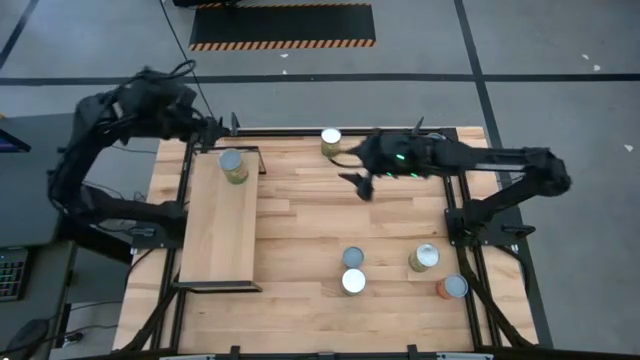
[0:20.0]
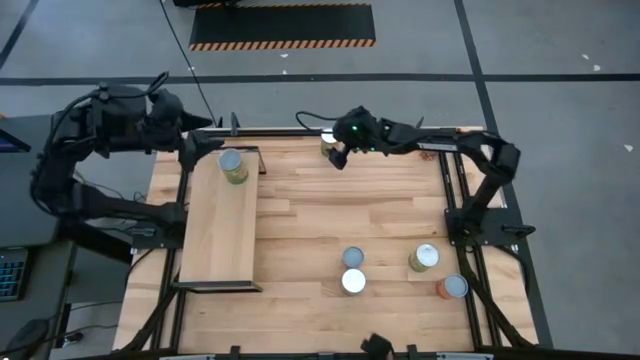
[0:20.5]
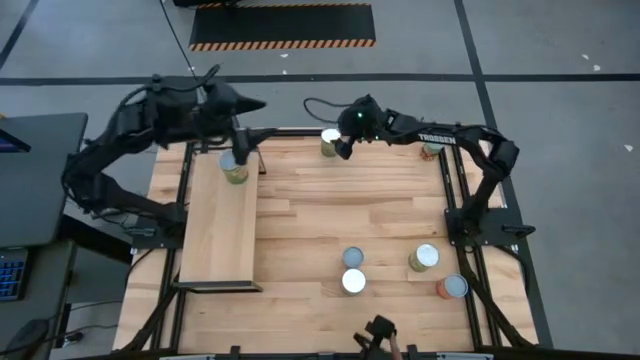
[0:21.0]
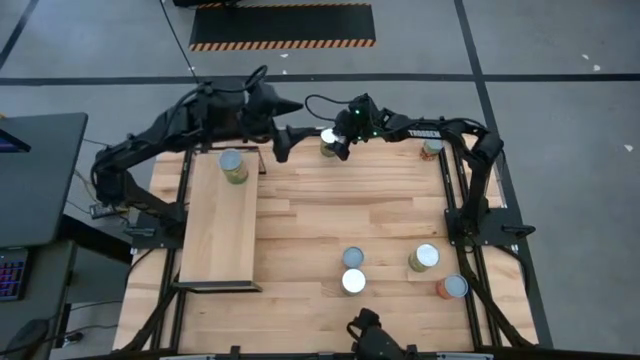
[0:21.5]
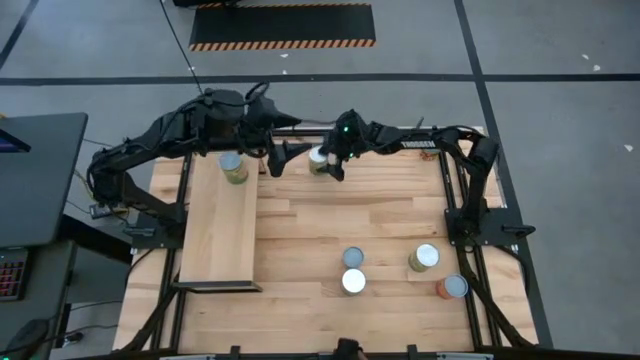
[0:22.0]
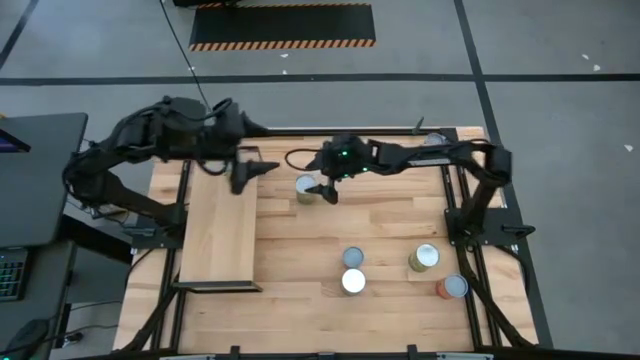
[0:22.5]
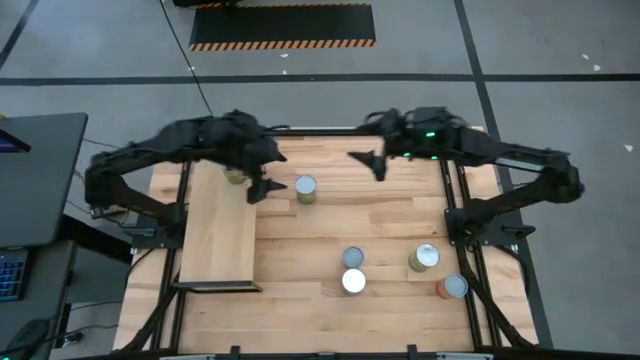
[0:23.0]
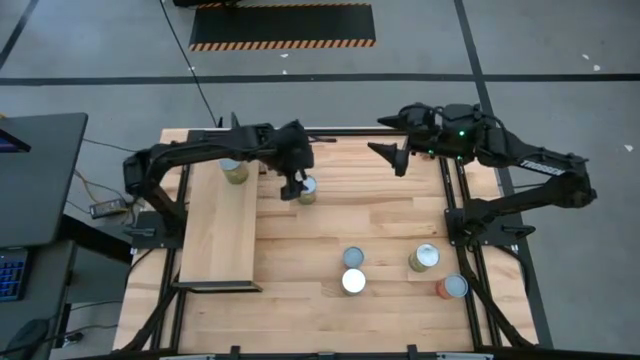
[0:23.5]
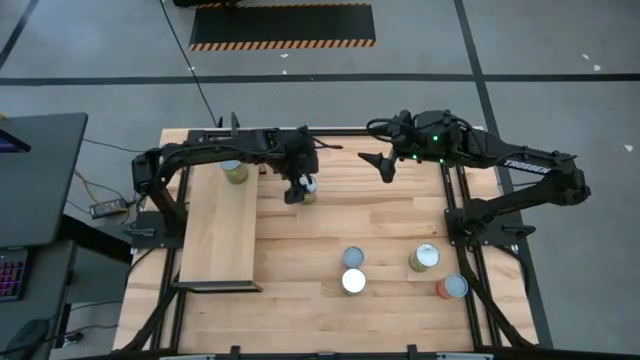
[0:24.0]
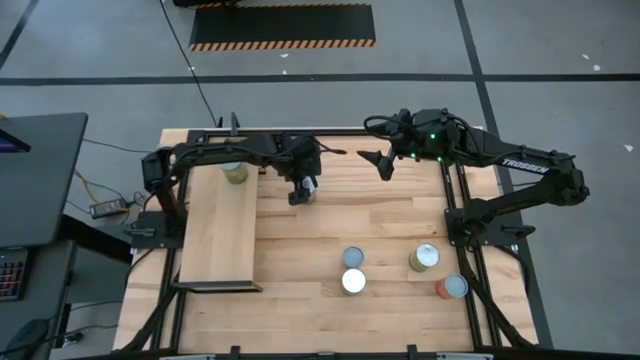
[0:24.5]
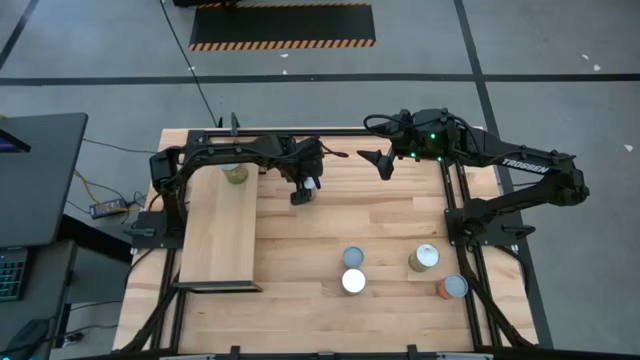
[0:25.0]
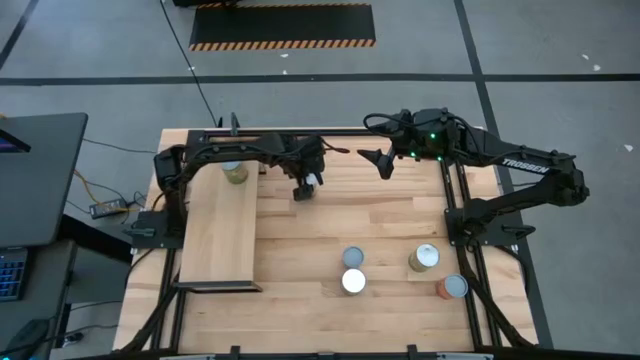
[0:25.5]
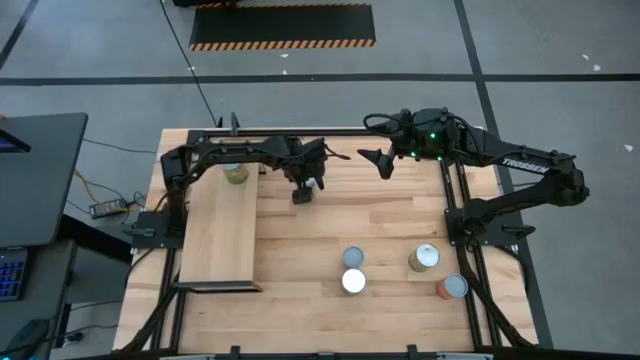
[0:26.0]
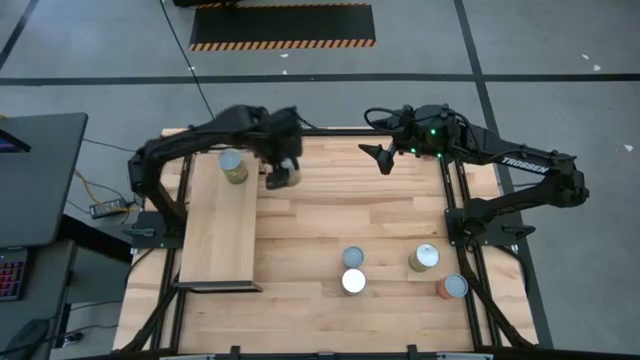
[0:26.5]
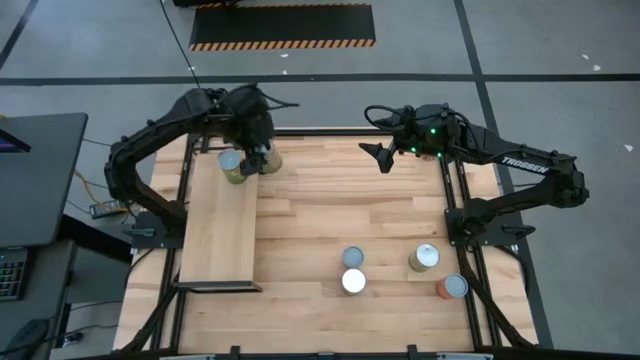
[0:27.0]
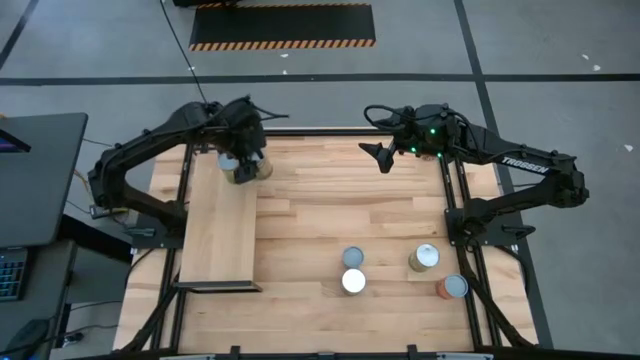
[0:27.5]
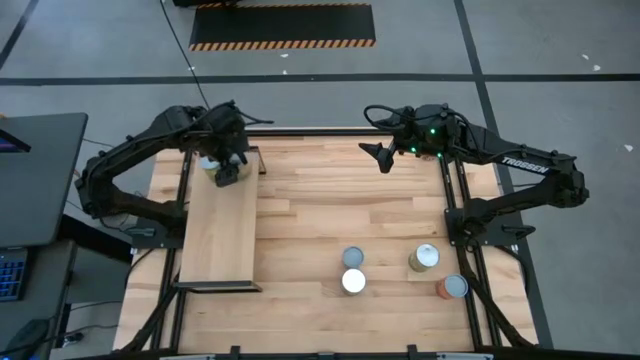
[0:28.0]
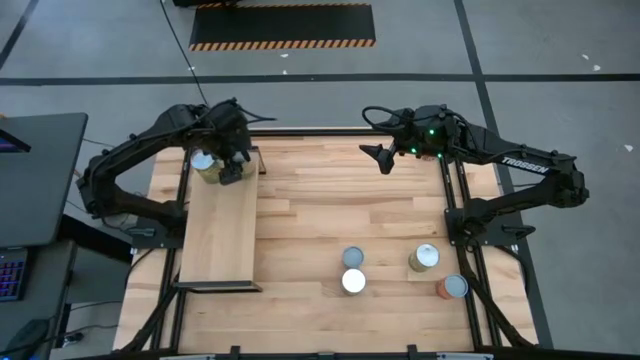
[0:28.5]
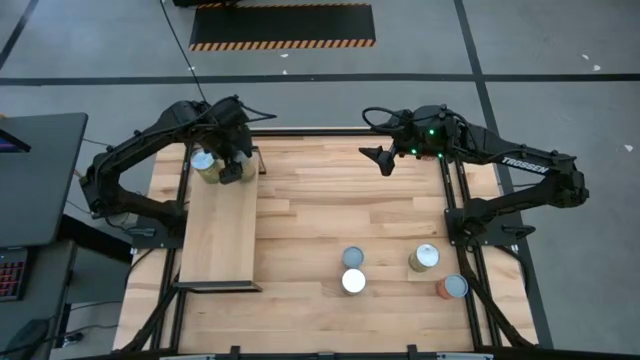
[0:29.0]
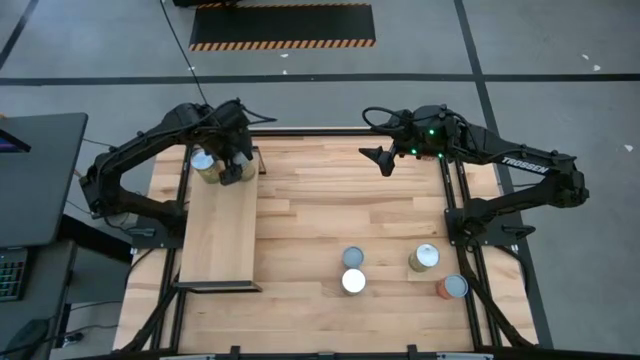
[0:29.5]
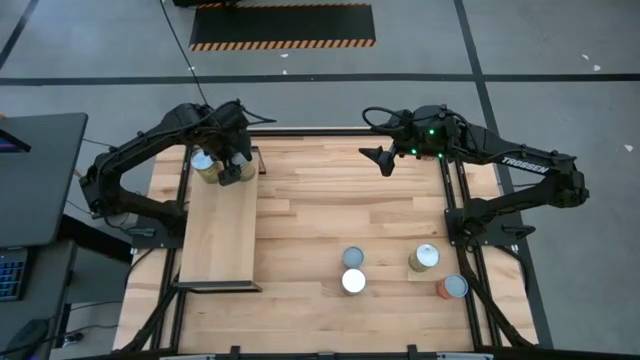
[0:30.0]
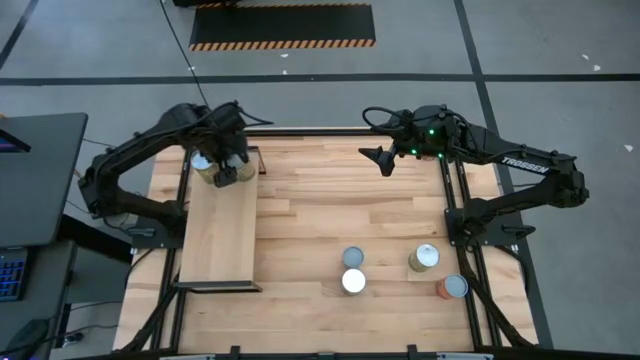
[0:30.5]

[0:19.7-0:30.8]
Task: Pick and place cans onto a shelf
Put the large canned oranges on the shelf aligned with the other large canned oranges

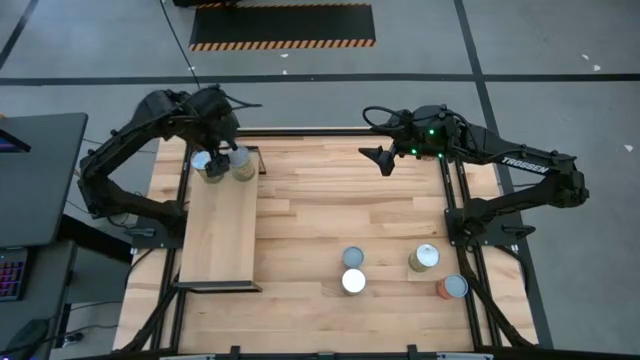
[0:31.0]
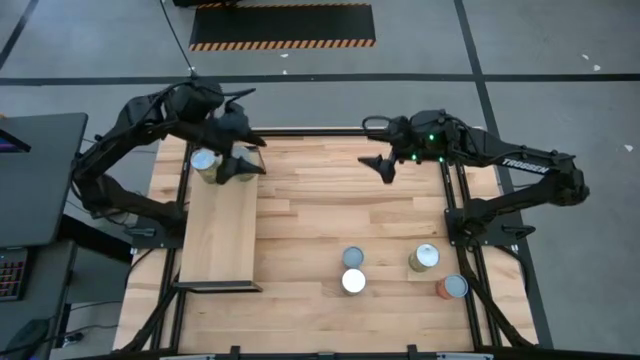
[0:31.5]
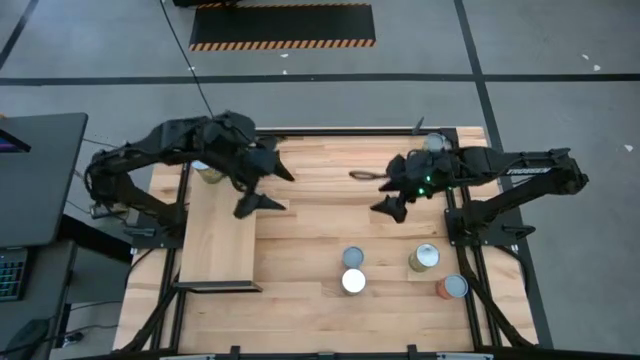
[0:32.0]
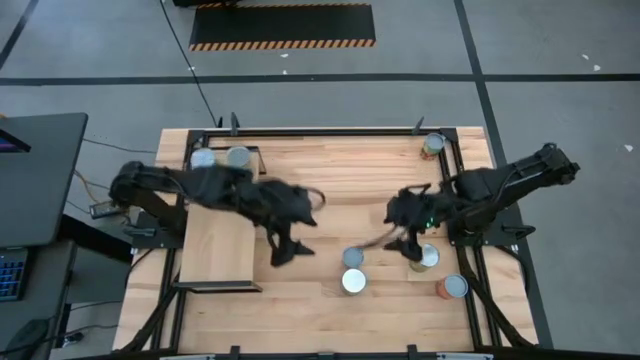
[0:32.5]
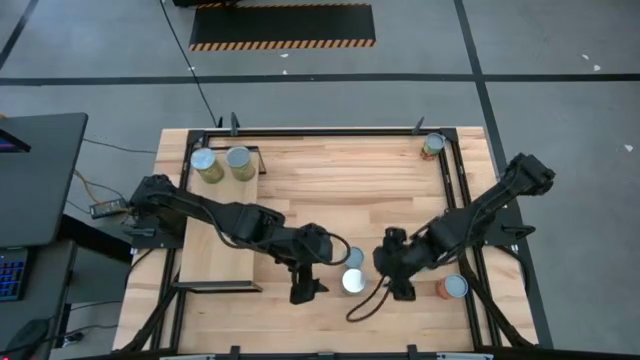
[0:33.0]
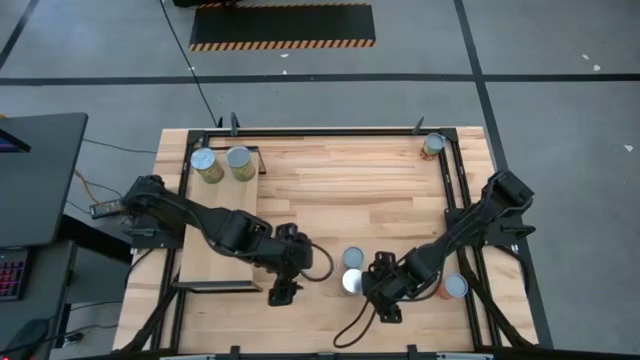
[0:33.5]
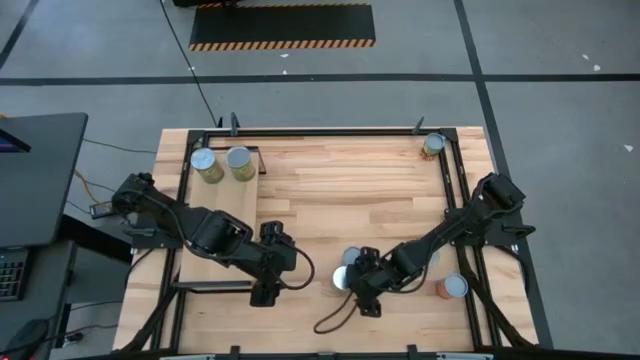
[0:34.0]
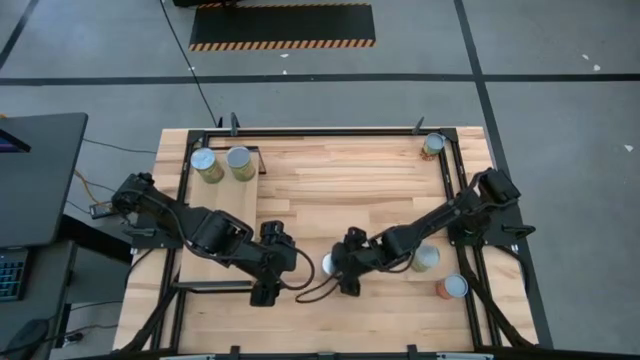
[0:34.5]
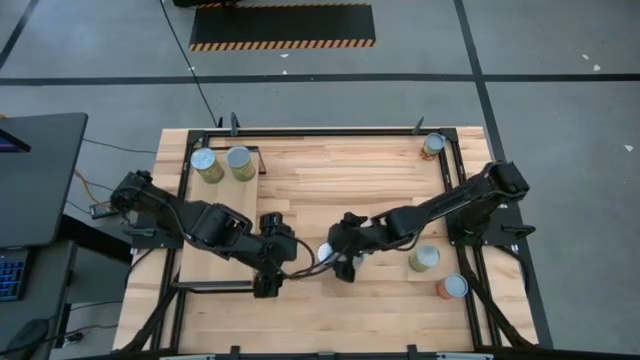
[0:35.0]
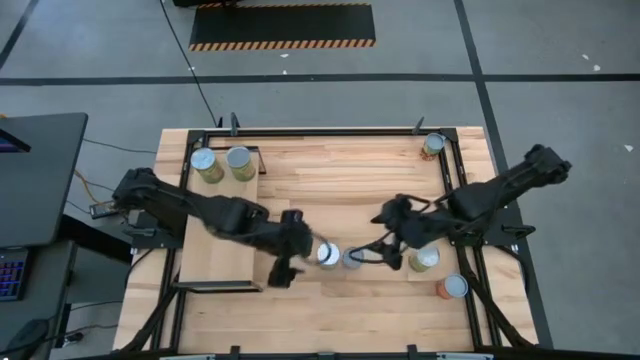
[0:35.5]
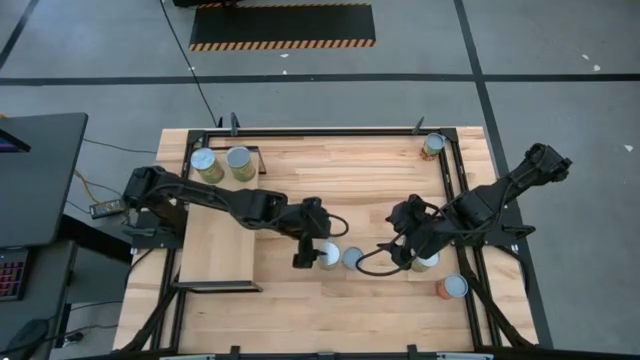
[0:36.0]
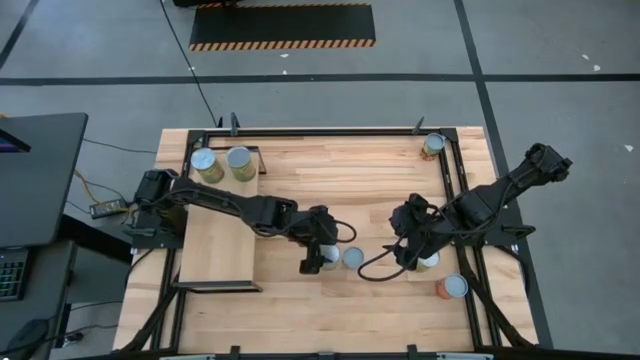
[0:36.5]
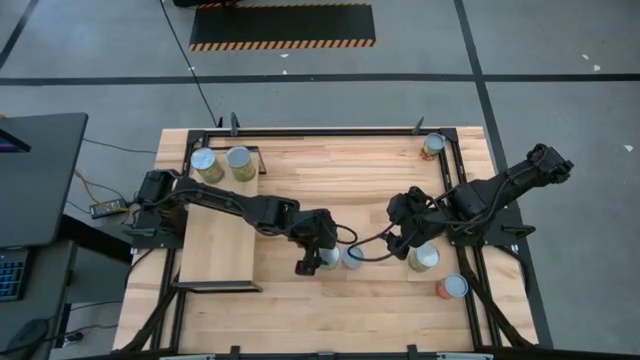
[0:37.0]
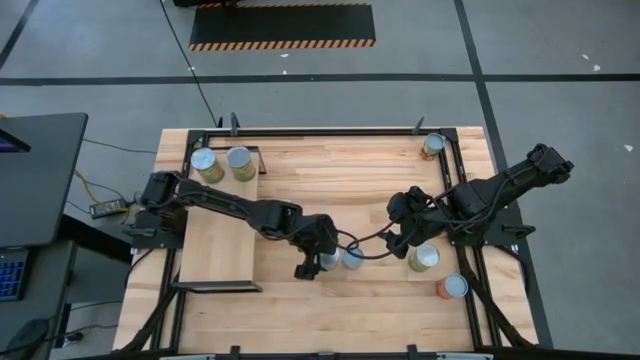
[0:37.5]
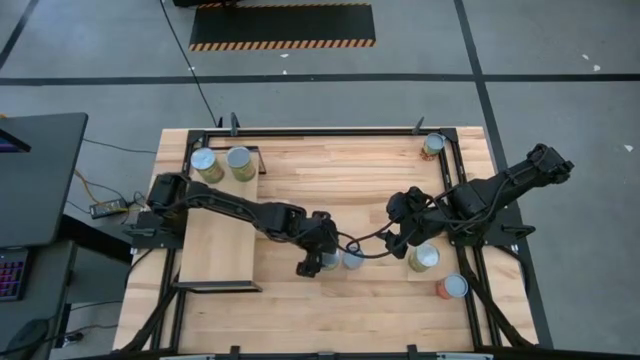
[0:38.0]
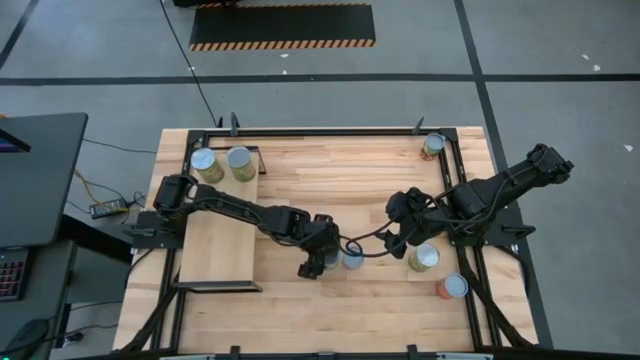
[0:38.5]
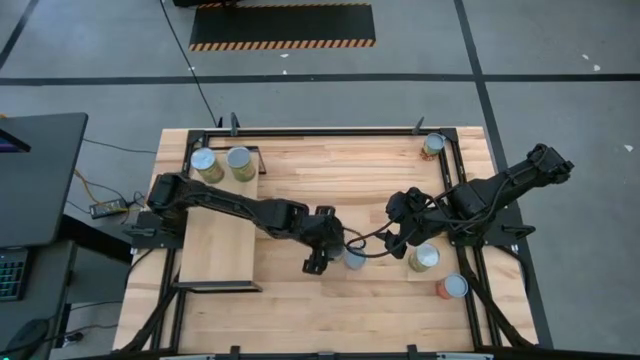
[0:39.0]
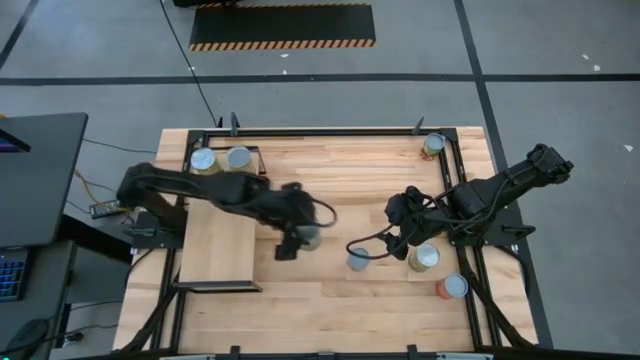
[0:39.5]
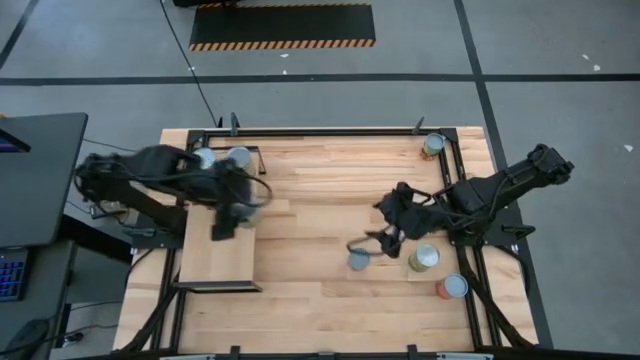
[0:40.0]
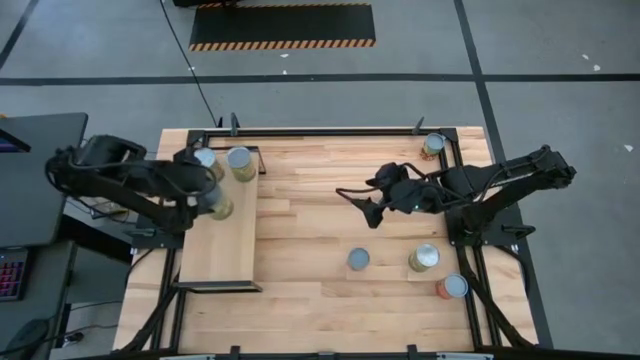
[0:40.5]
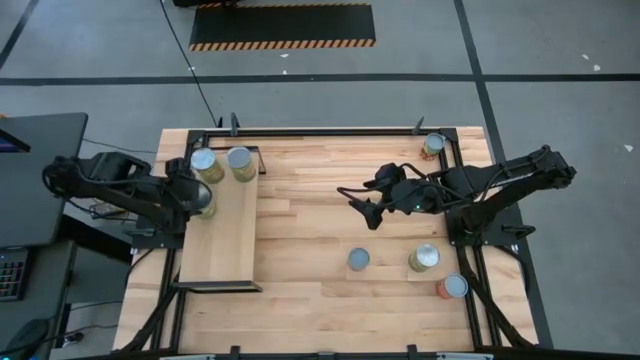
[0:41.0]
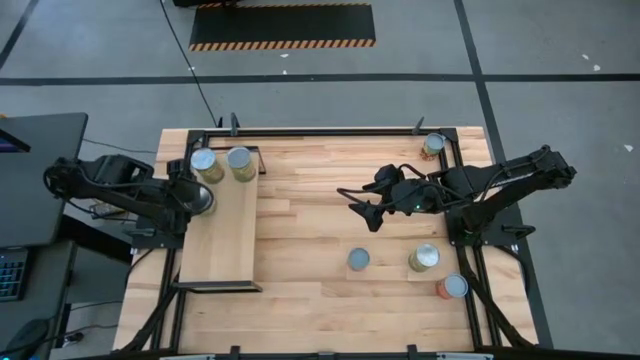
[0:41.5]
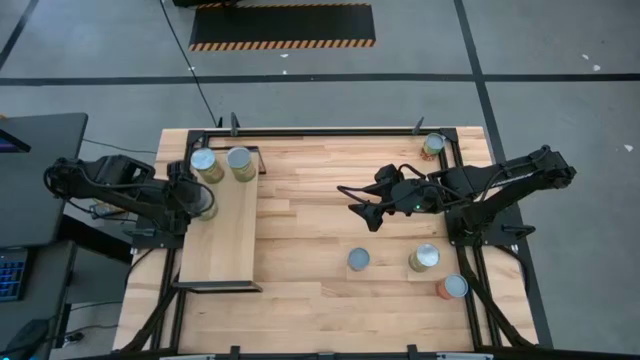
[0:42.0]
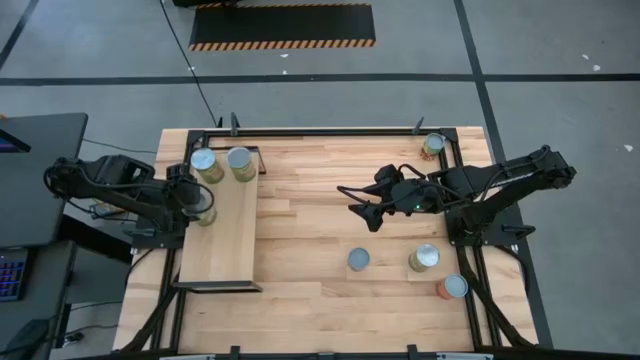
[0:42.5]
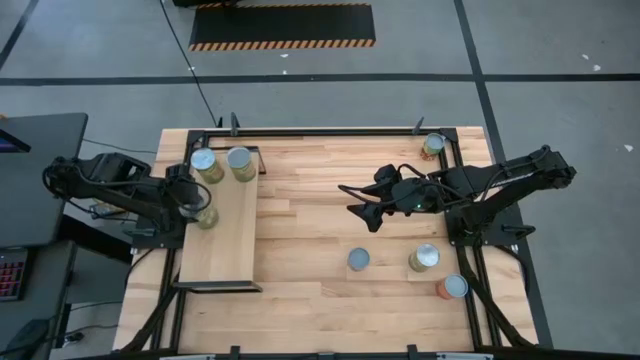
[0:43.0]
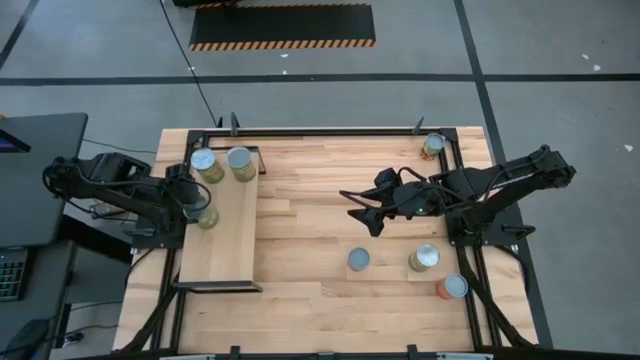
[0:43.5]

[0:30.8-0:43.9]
Put the left canned pears on the shelf
